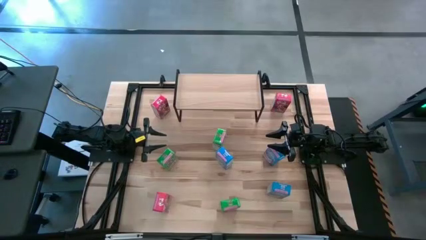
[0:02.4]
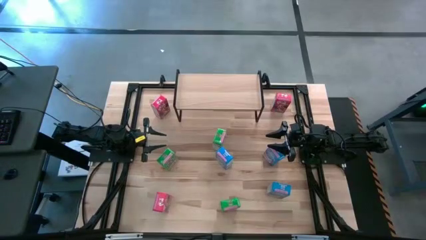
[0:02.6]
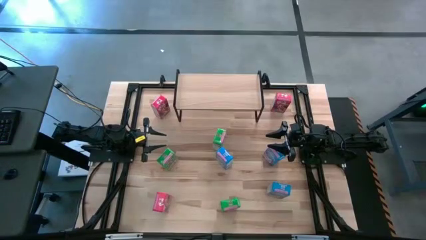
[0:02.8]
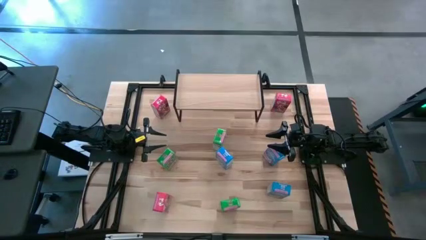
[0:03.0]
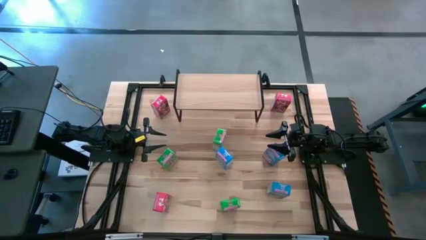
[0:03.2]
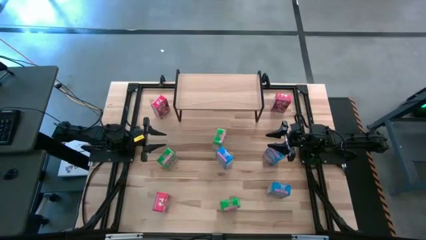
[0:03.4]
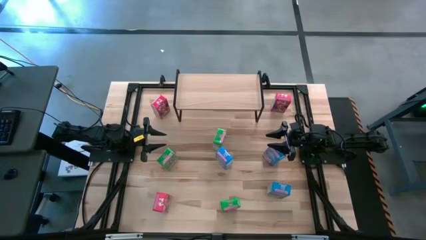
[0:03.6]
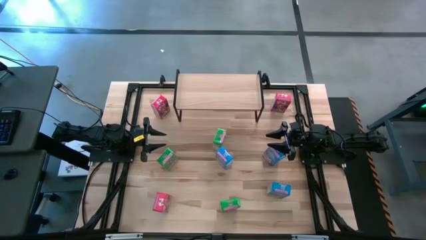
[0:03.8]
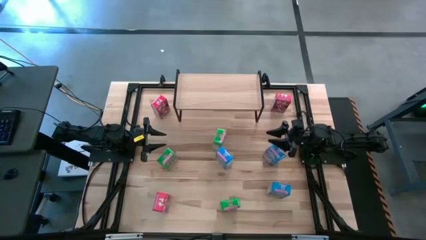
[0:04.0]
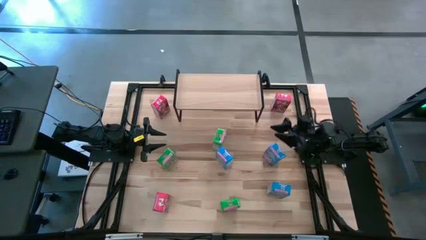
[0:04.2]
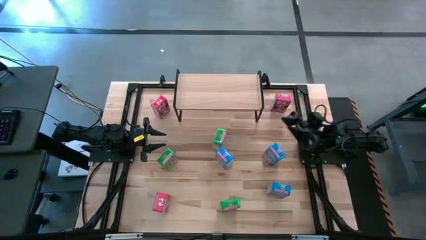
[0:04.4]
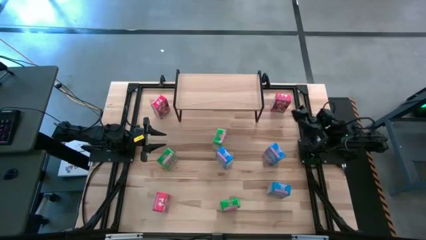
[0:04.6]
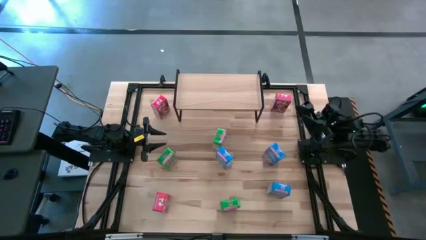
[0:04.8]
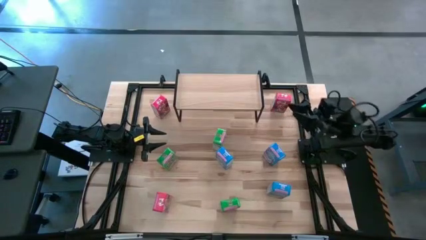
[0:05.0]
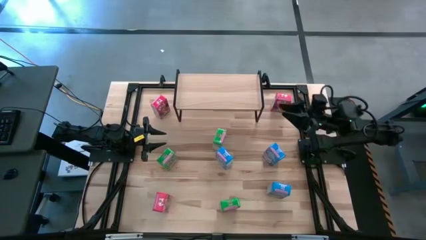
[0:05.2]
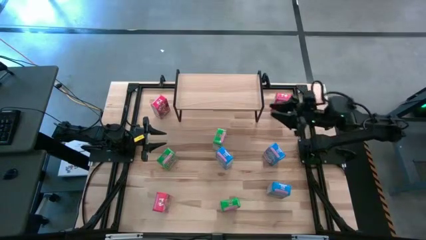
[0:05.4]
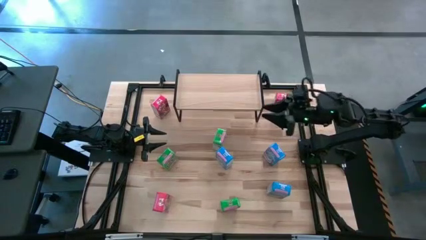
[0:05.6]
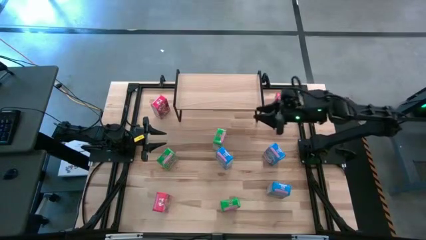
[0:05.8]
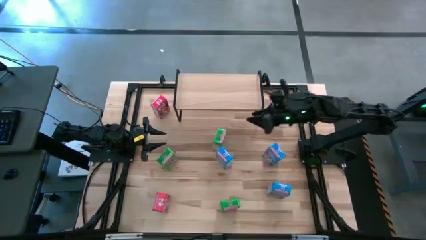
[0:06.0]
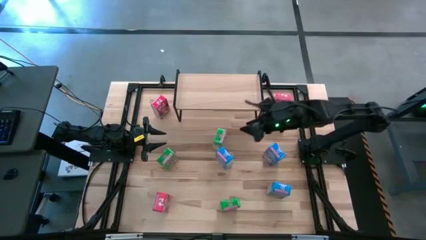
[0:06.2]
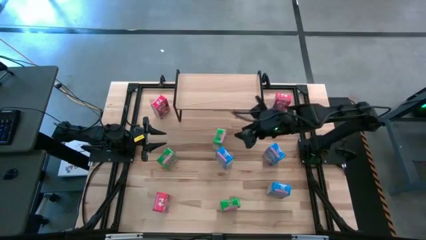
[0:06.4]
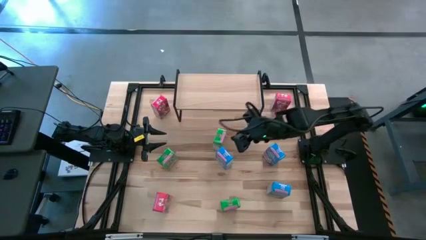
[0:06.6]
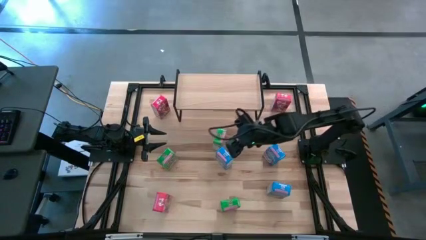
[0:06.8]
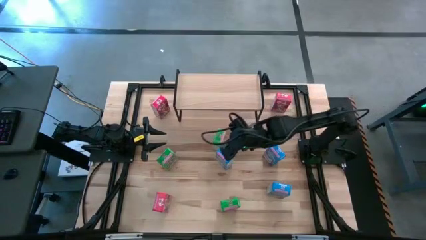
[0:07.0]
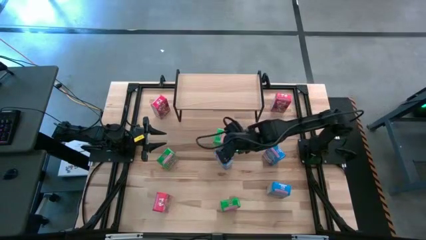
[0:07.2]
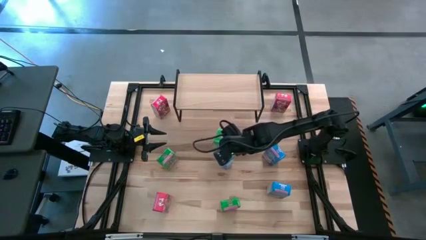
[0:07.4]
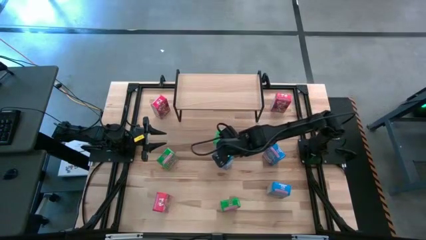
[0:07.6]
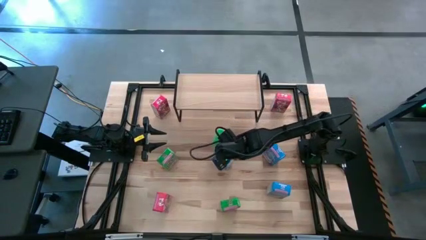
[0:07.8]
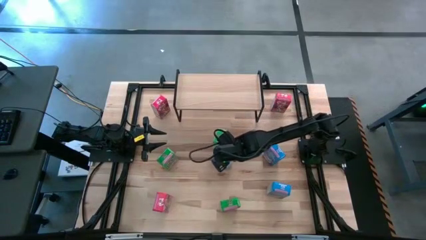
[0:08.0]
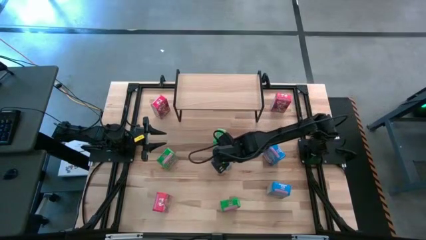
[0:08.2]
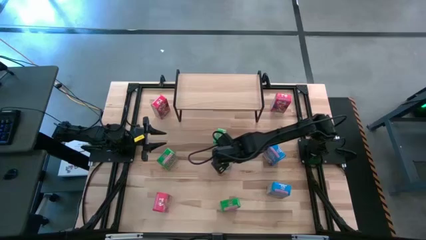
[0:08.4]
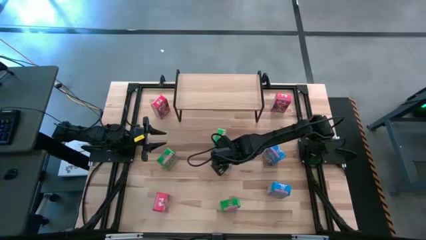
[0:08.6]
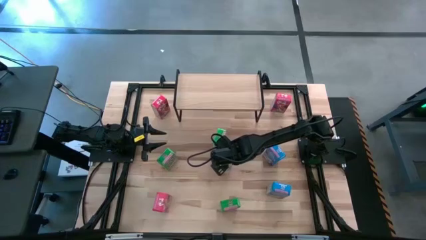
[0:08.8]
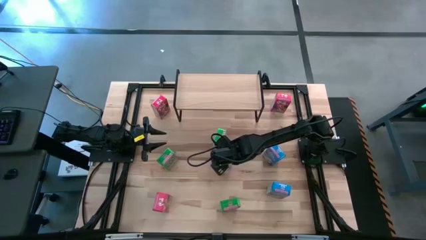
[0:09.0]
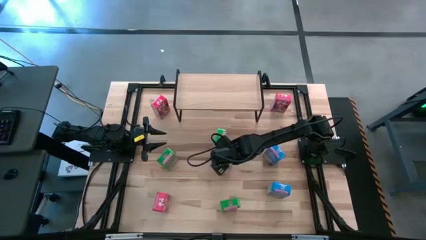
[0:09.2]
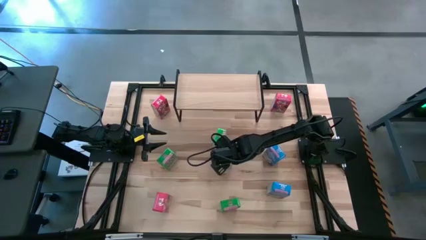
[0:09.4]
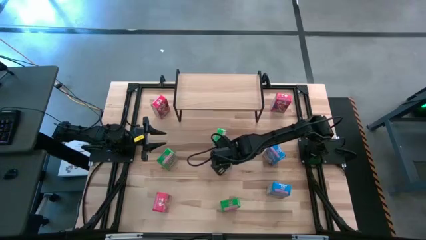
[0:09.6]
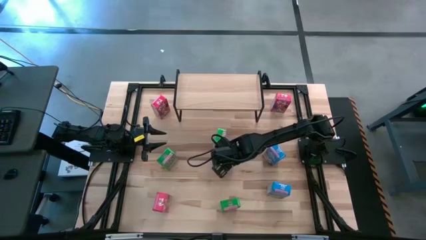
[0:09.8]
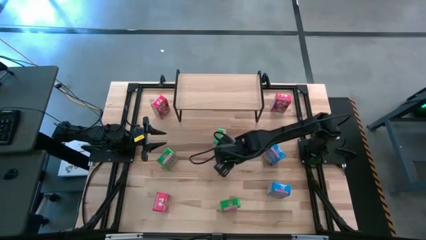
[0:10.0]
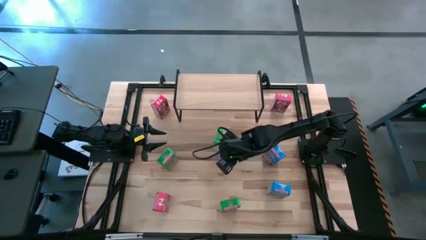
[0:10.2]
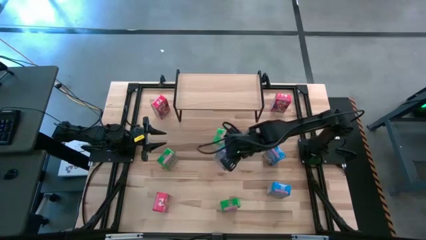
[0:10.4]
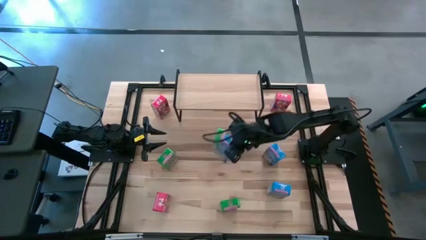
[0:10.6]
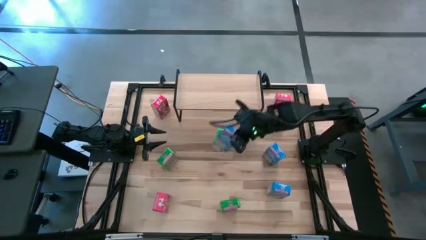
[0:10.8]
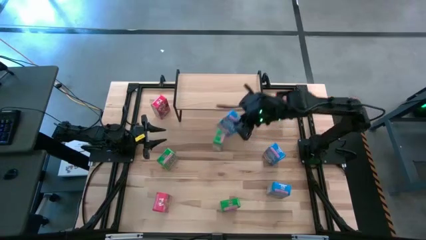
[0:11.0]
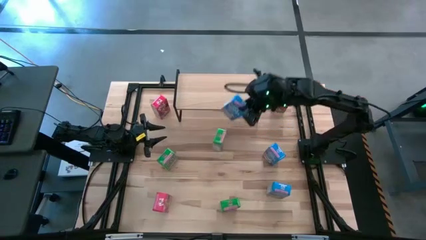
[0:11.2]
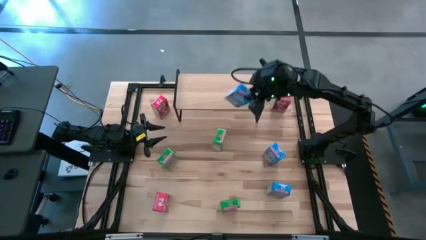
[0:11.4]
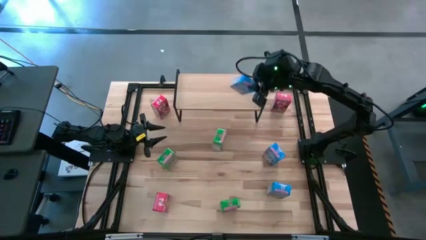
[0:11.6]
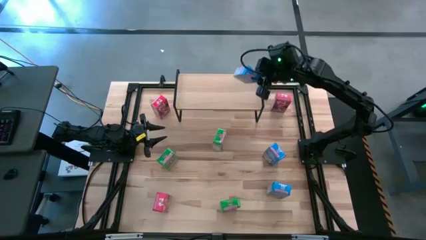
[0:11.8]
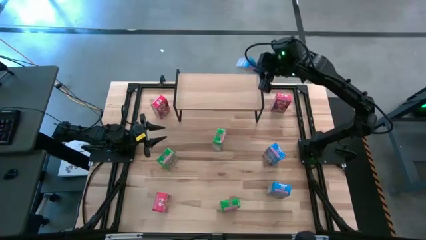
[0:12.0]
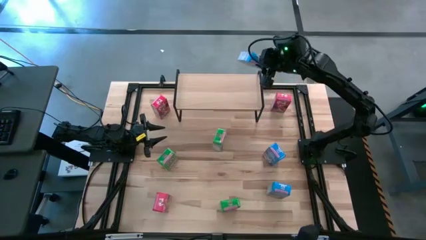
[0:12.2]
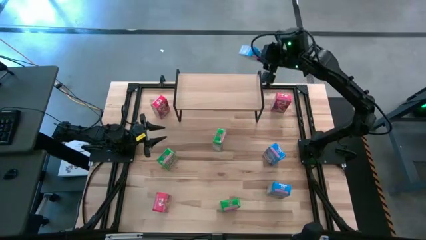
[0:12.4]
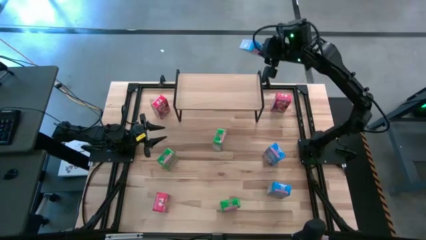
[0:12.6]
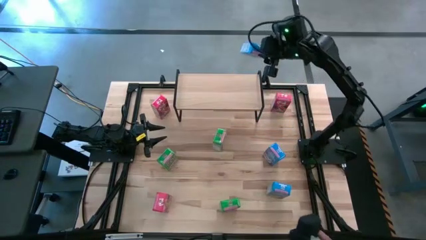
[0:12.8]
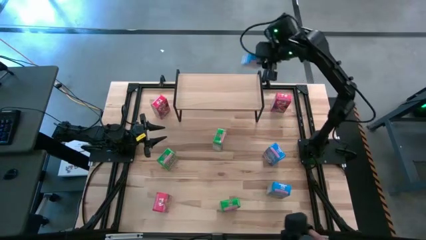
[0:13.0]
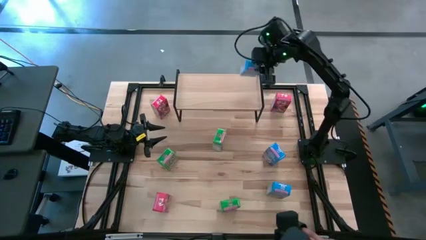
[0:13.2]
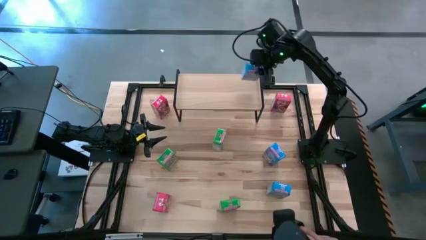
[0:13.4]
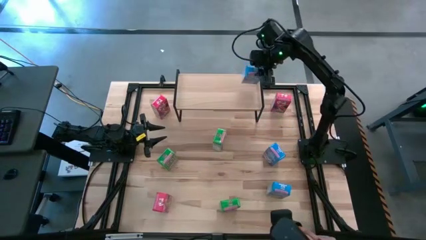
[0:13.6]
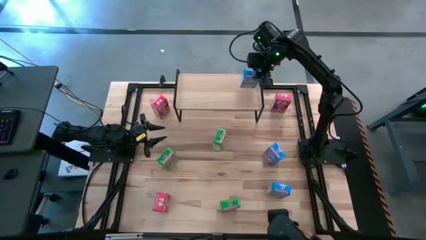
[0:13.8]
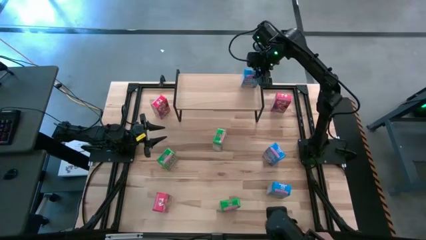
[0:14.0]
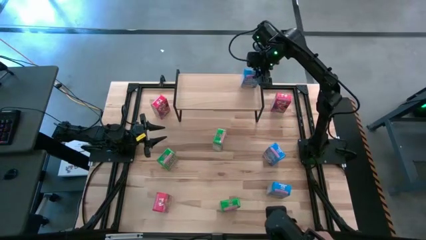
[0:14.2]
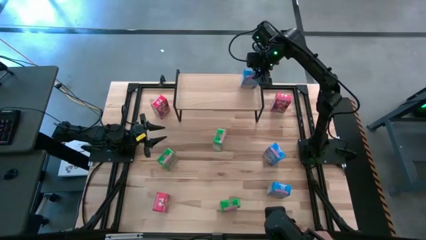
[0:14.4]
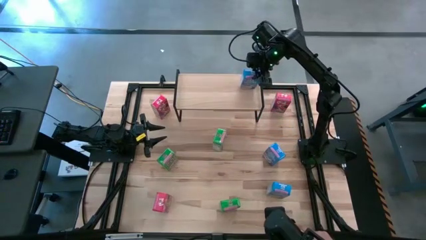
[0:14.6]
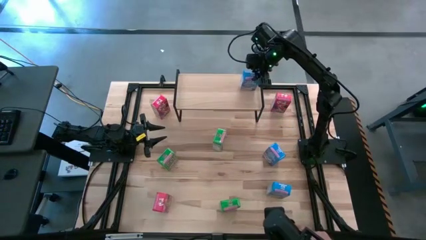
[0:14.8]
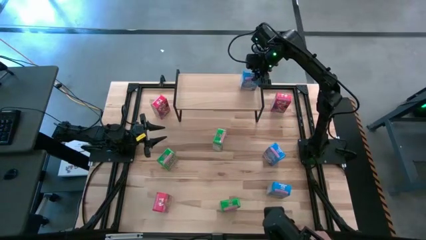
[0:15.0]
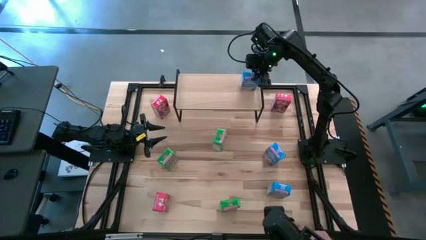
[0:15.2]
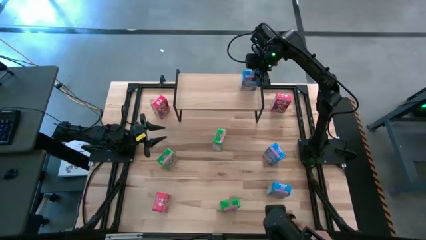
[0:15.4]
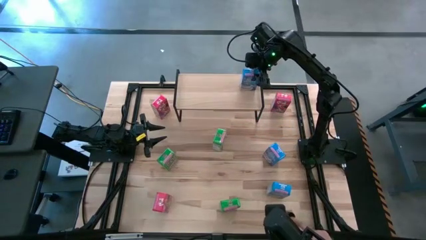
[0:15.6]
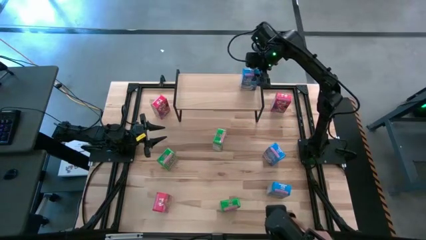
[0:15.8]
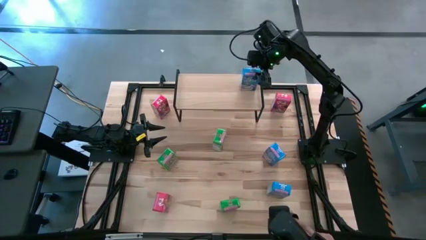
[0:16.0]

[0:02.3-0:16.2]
Task: Stack cereal on shelf
Put the left blue cereal box on the shelf
